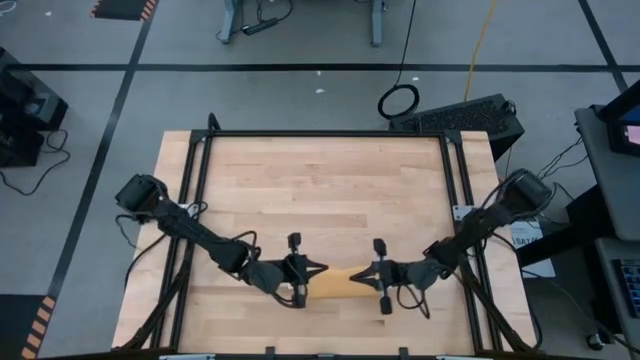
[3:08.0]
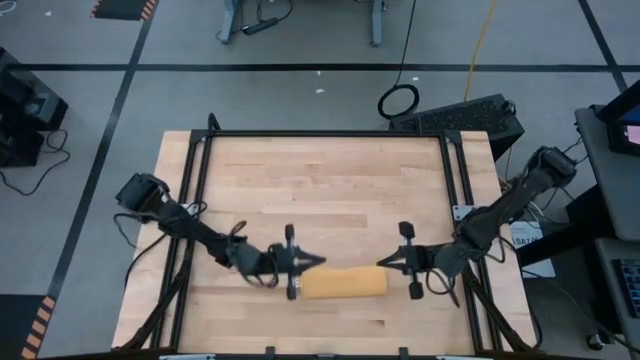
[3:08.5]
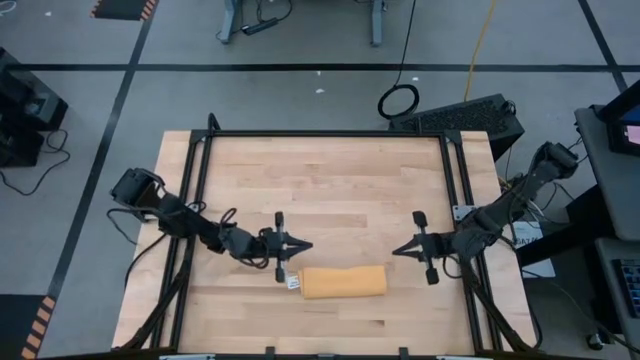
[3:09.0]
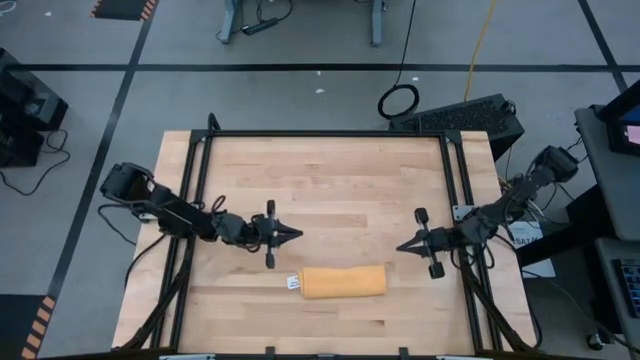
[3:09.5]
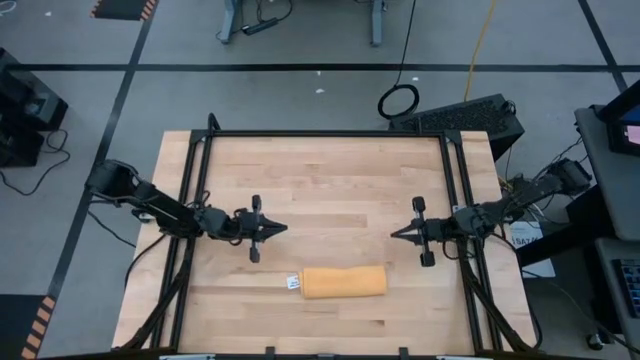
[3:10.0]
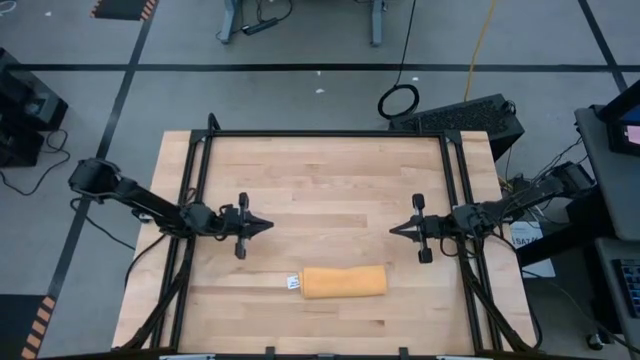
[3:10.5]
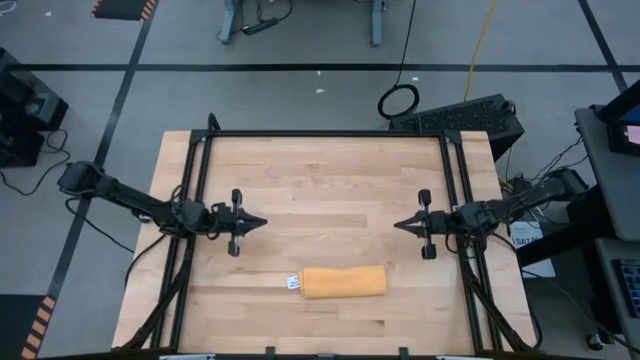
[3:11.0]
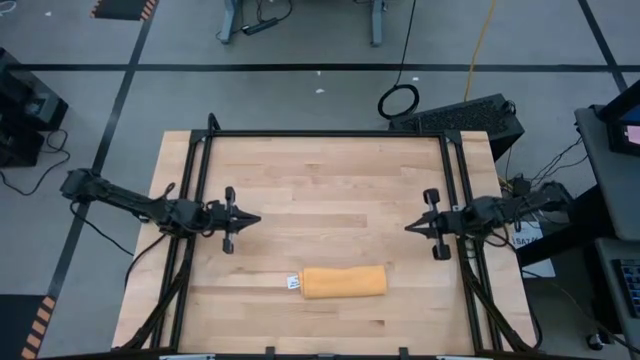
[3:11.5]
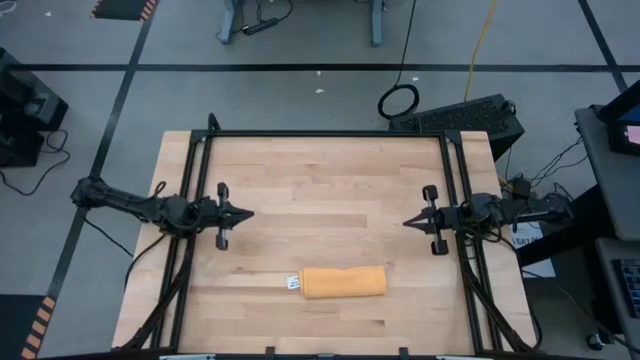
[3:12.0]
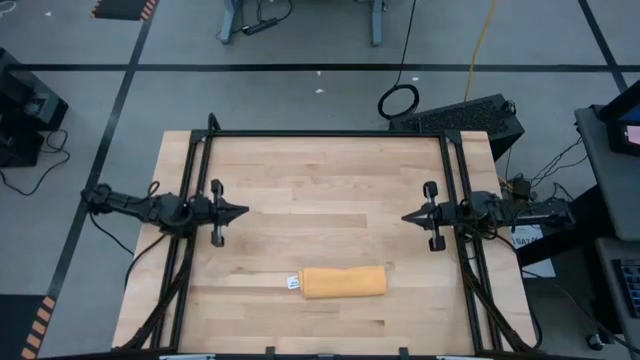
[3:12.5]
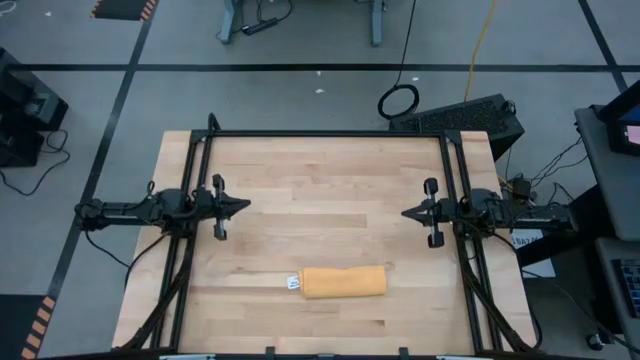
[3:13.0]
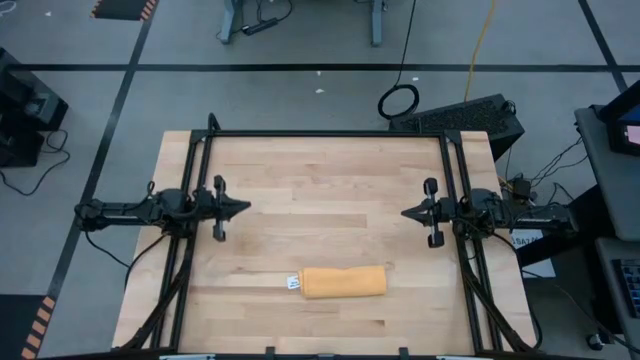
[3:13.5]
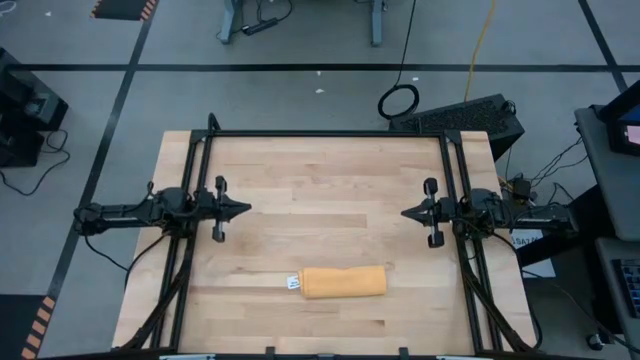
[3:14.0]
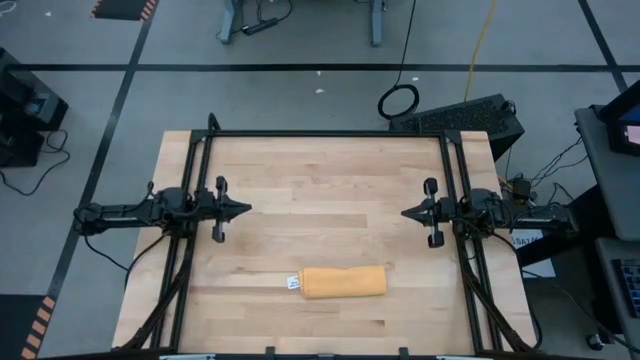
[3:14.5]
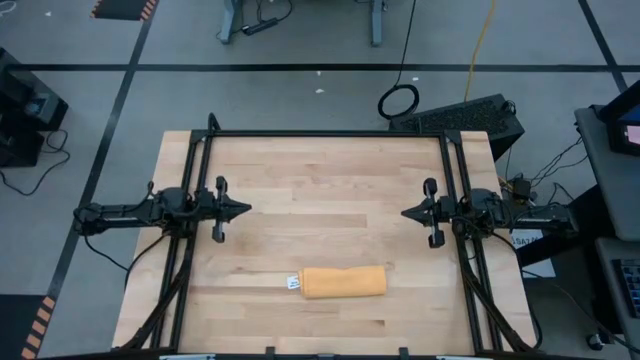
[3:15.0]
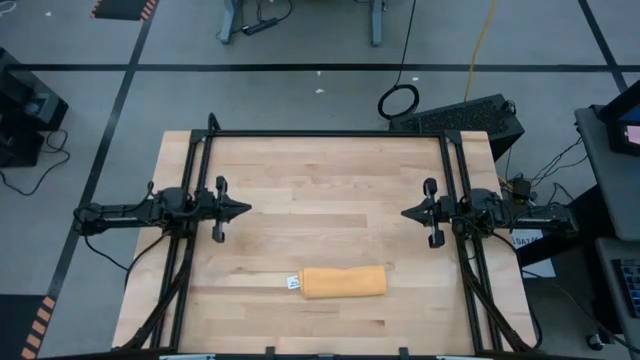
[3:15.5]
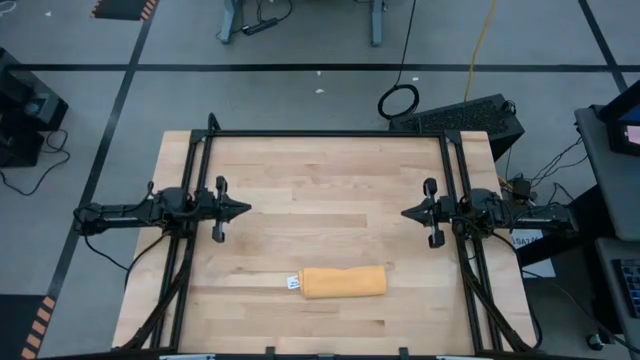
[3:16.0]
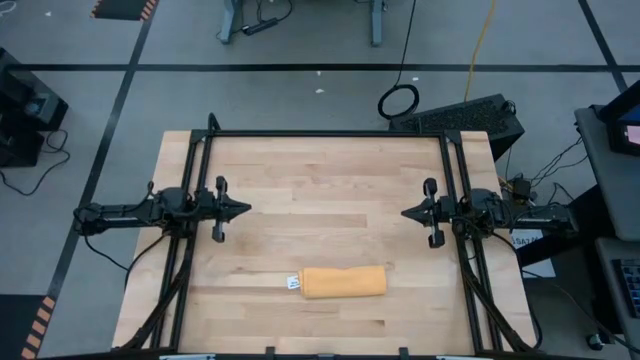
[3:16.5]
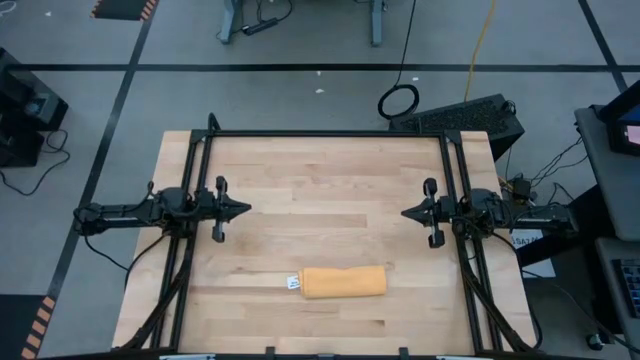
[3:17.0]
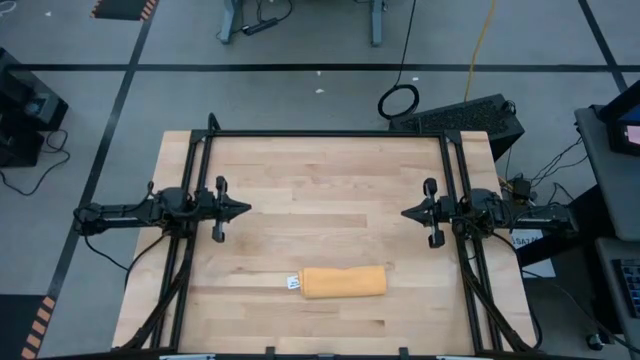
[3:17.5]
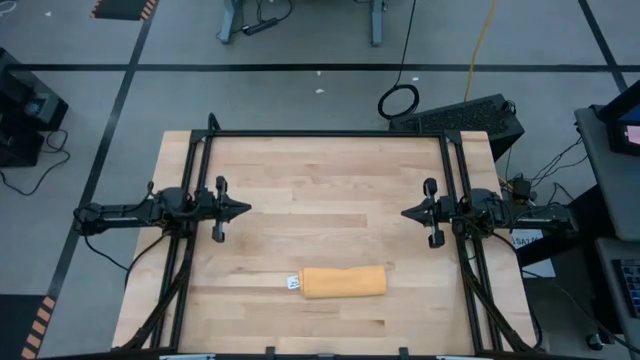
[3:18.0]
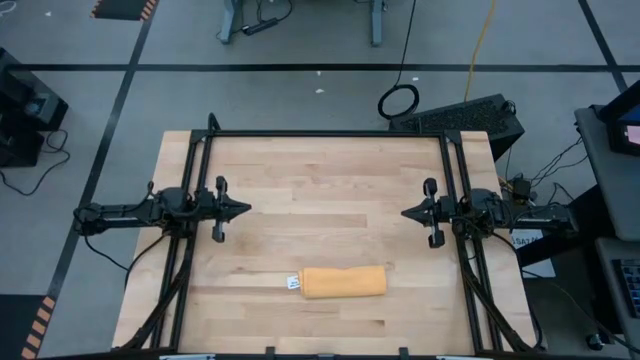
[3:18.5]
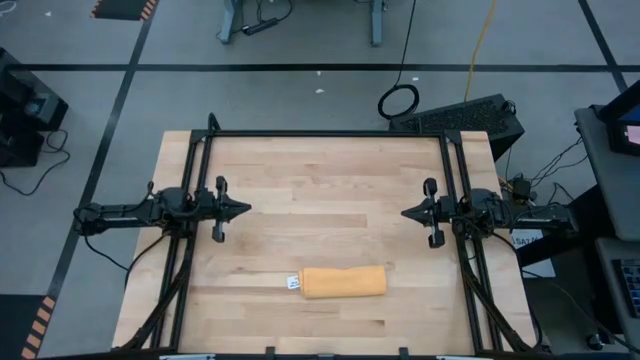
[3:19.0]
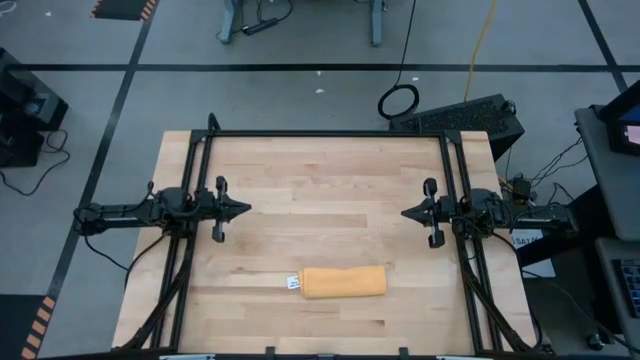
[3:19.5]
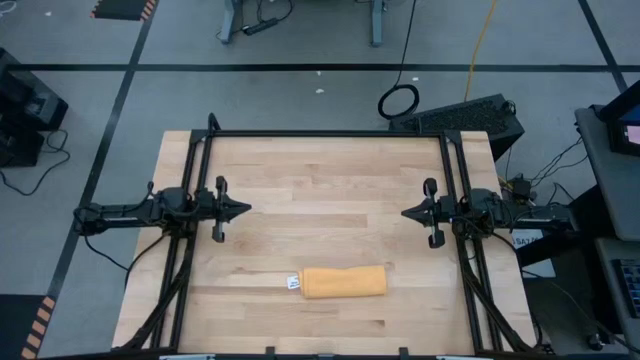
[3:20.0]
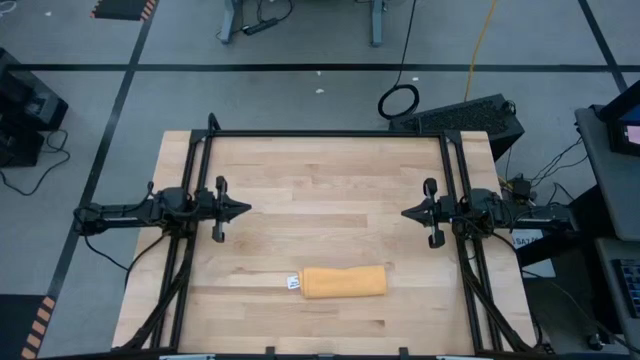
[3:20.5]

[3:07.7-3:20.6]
Task: Roll towel into tight, uniform cylinder
Return to Home Position

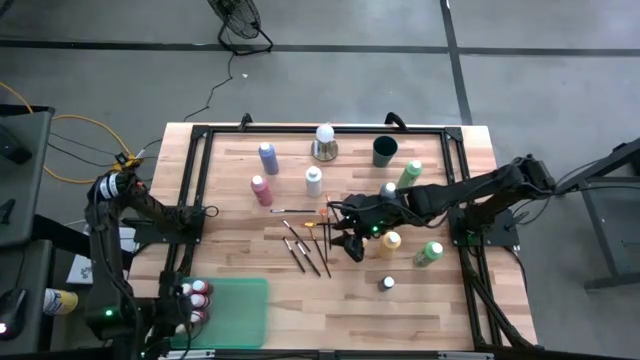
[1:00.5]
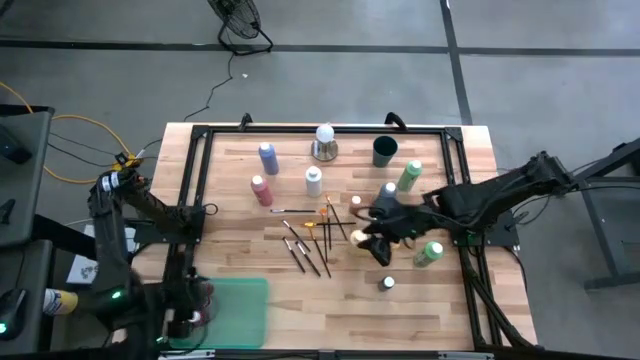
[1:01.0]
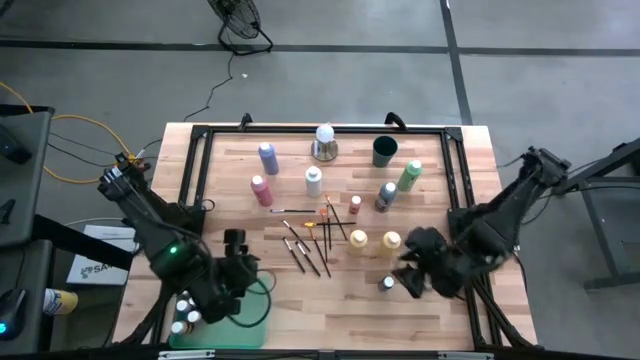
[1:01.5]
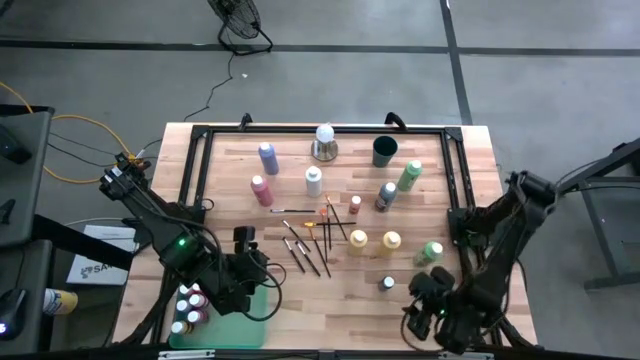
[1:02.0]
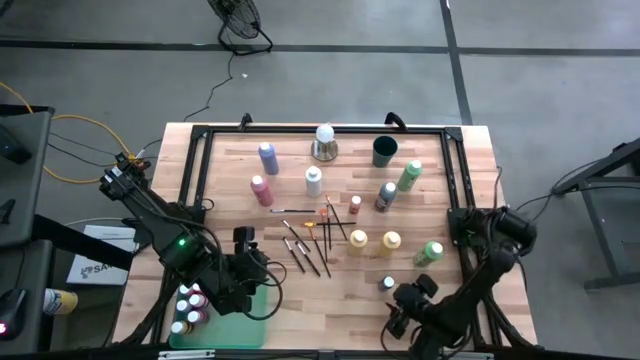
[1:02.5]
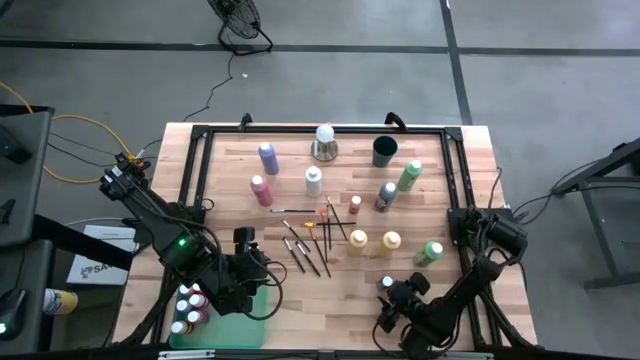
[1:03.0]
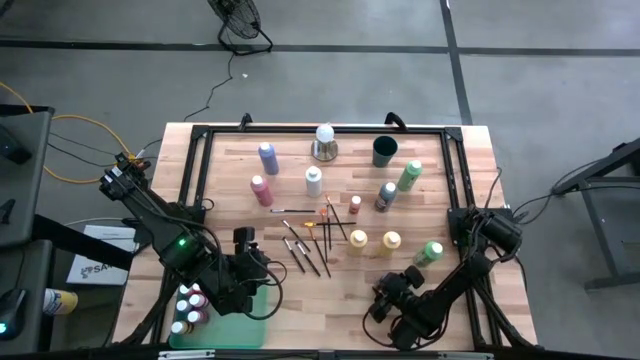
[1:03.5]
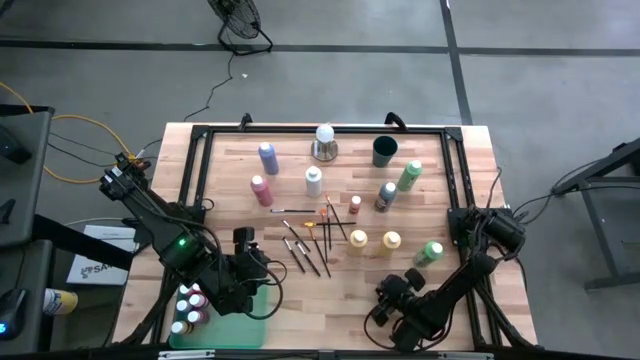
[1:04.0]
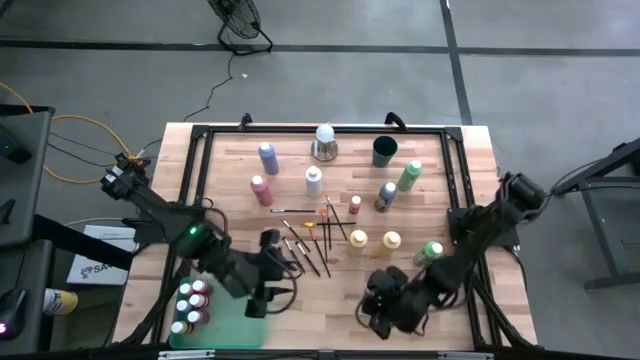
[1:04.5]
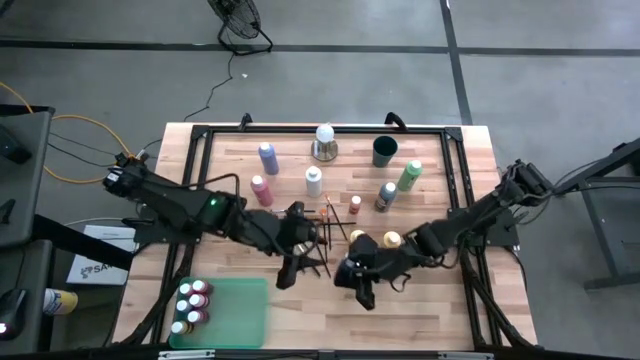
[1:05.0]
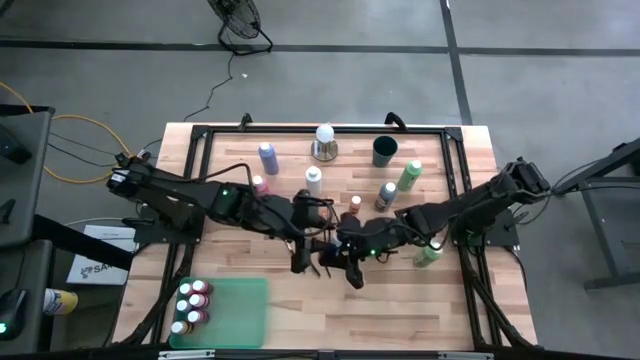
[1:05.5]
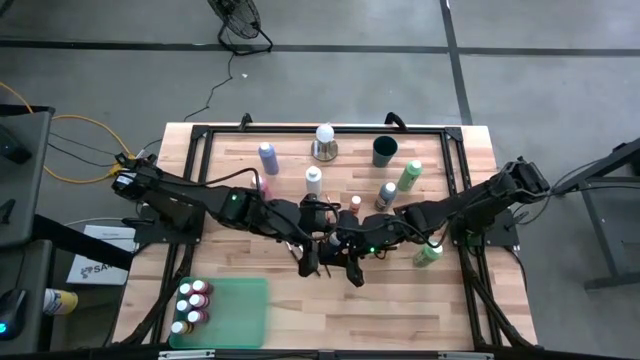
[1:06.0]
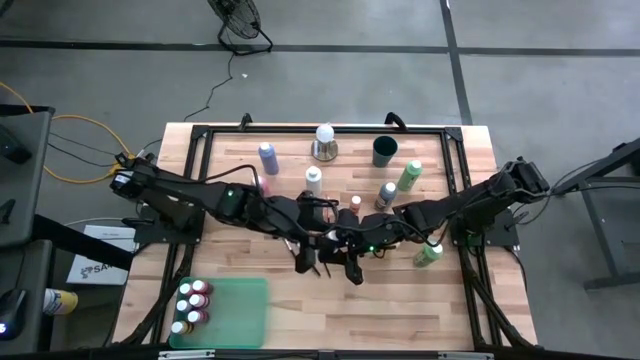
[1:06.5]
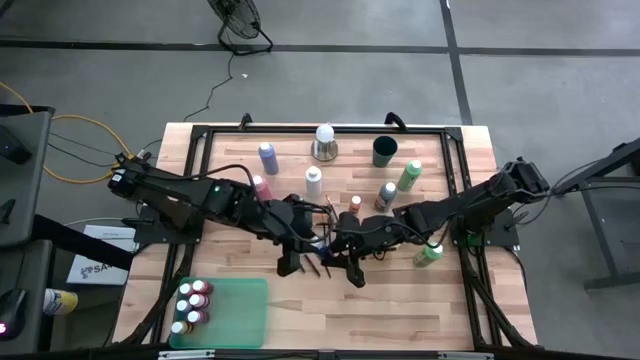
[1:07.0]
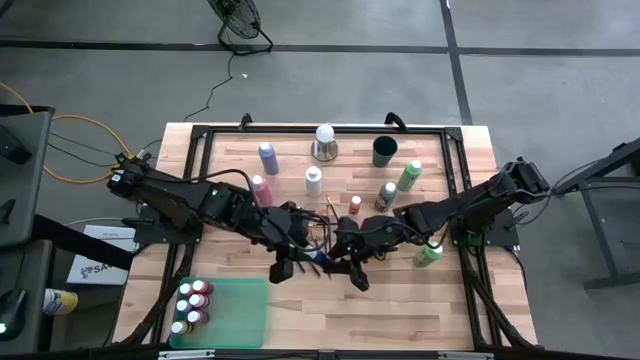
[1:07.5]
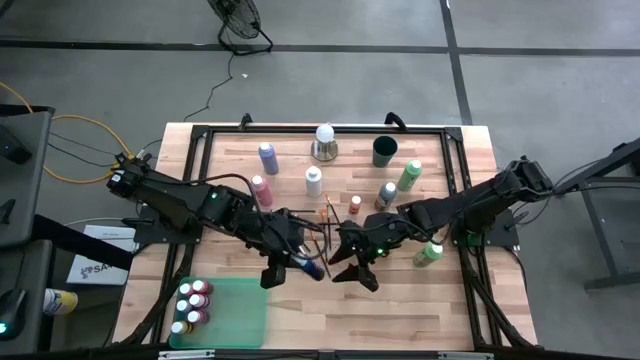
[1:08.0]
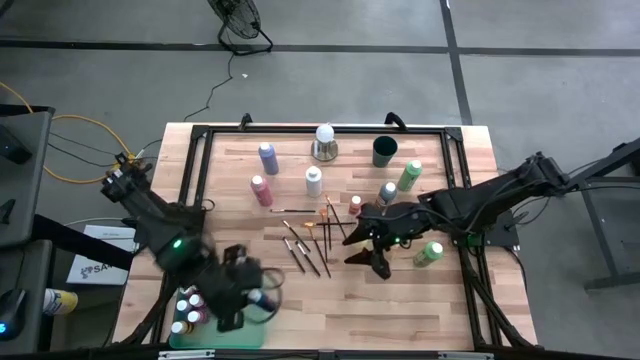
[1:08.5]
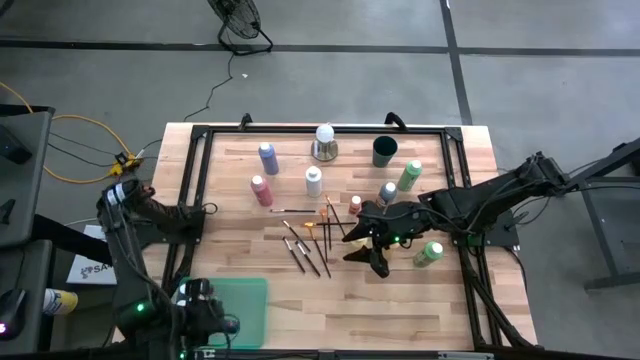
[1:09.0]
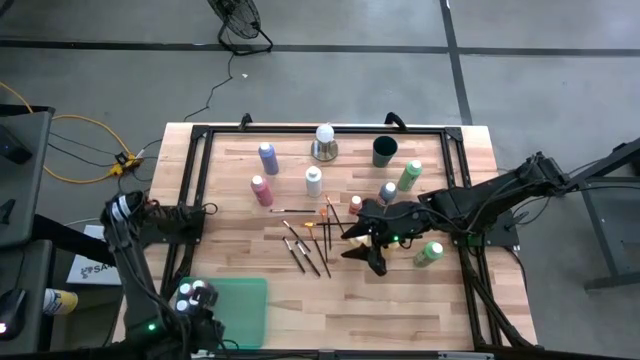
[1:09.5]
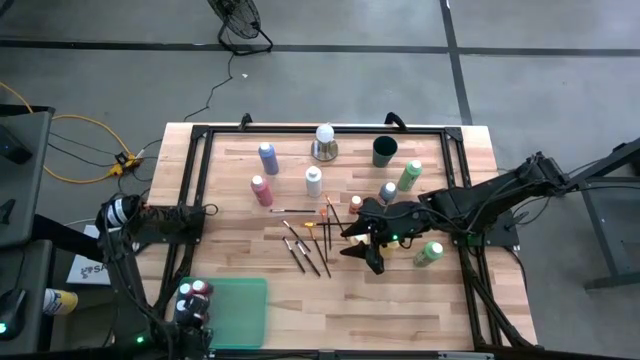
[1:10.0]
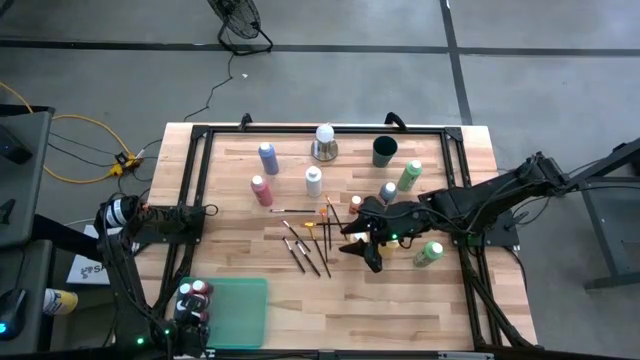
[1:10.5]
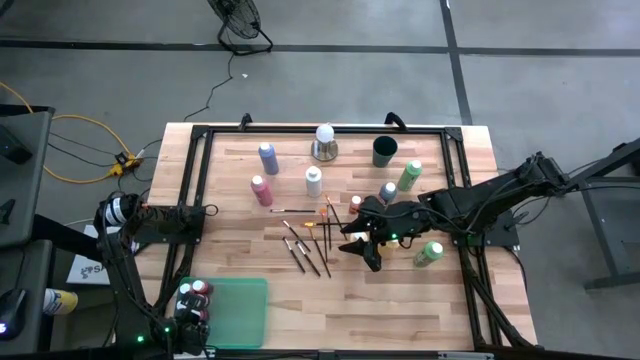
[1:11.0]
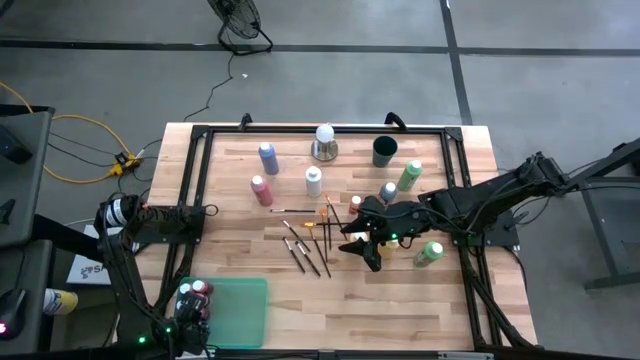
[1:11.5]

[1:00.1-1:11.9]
Task: Pick & Place Paint Supplies
Put the blue paint bottle into the green bin
